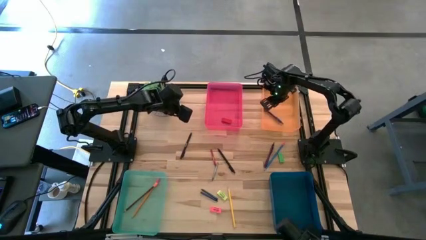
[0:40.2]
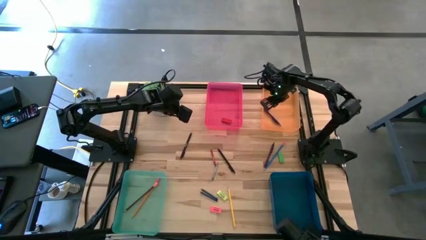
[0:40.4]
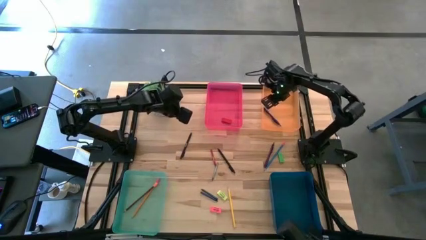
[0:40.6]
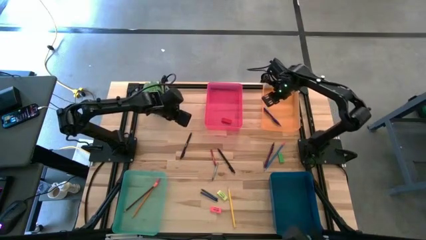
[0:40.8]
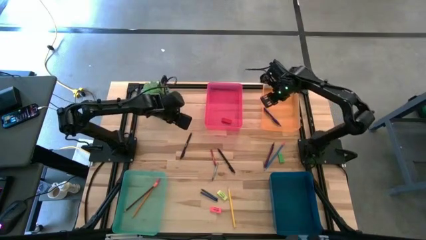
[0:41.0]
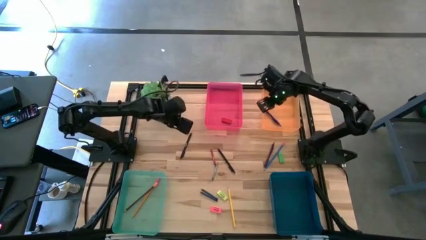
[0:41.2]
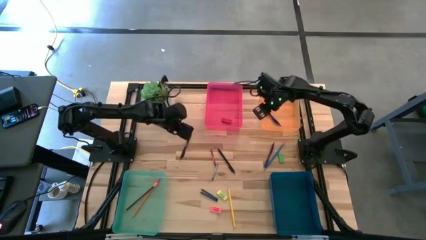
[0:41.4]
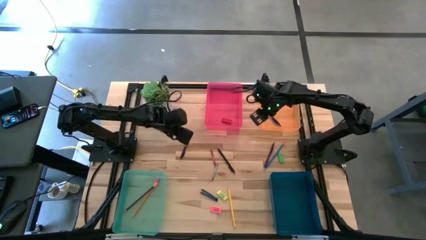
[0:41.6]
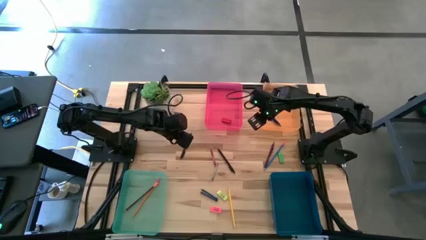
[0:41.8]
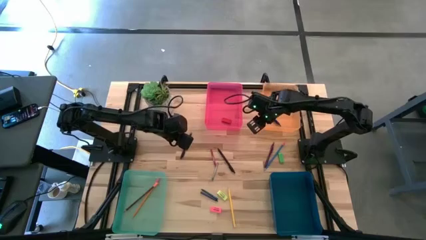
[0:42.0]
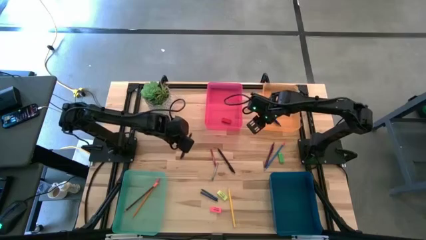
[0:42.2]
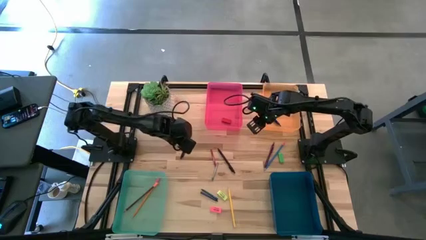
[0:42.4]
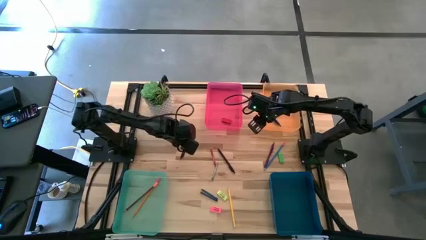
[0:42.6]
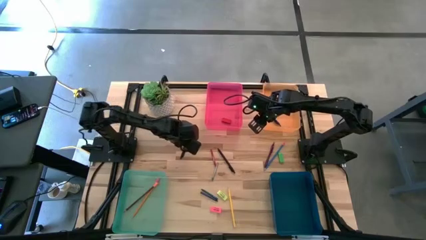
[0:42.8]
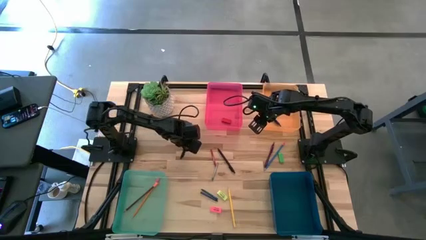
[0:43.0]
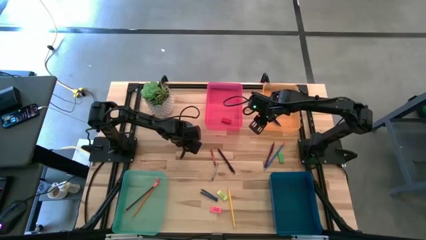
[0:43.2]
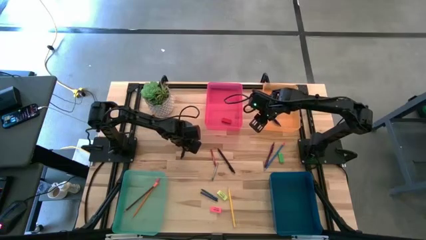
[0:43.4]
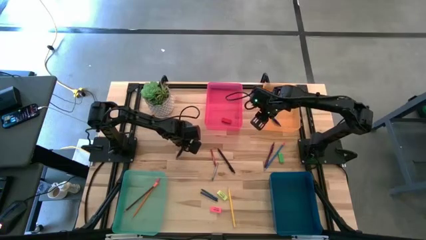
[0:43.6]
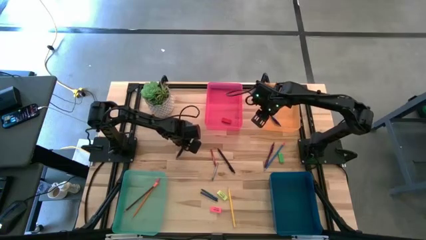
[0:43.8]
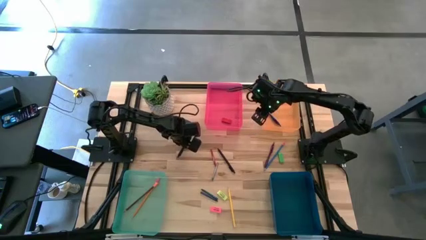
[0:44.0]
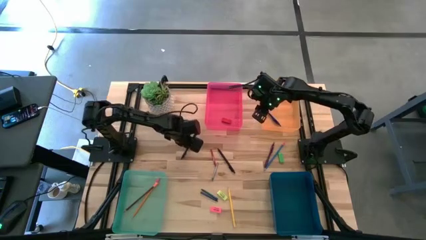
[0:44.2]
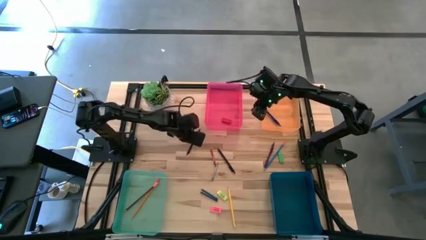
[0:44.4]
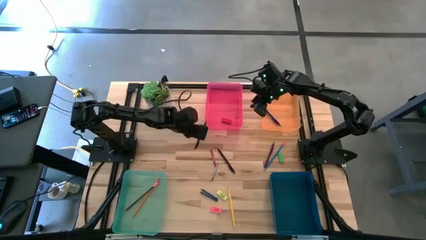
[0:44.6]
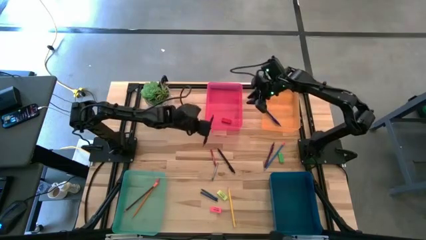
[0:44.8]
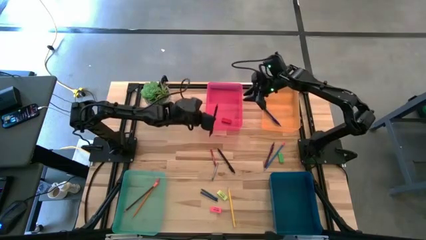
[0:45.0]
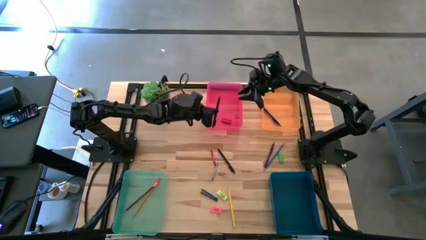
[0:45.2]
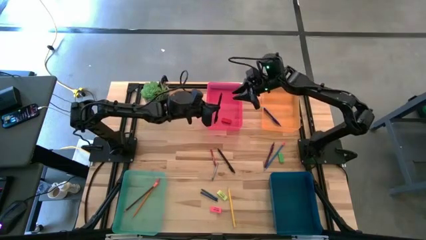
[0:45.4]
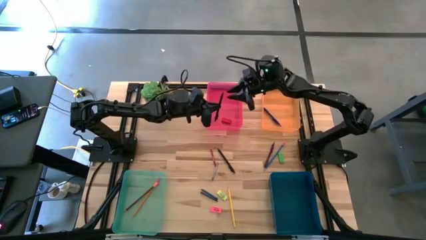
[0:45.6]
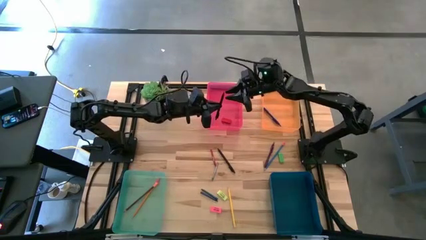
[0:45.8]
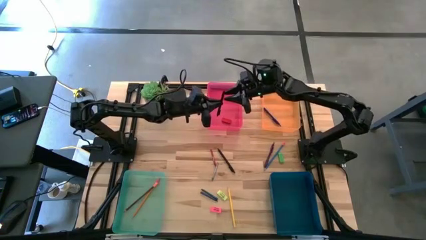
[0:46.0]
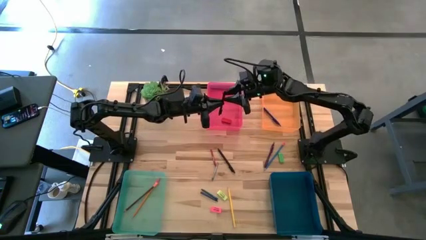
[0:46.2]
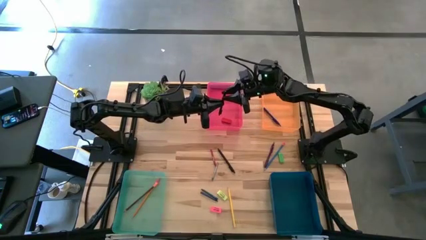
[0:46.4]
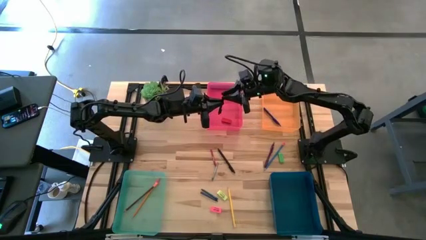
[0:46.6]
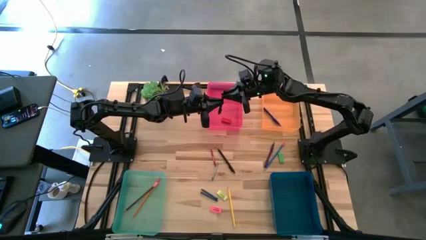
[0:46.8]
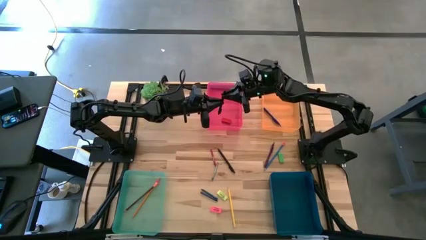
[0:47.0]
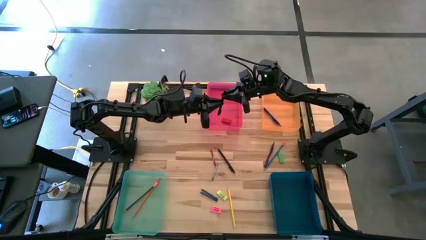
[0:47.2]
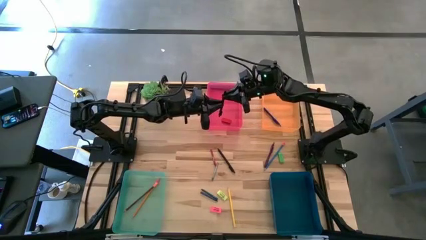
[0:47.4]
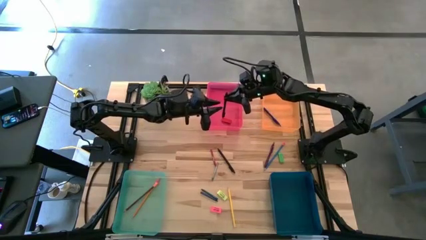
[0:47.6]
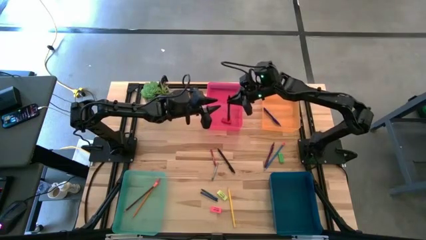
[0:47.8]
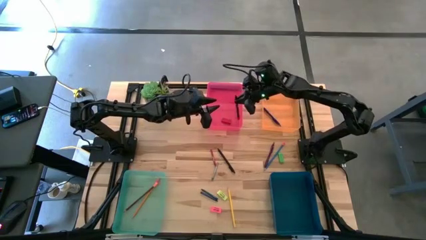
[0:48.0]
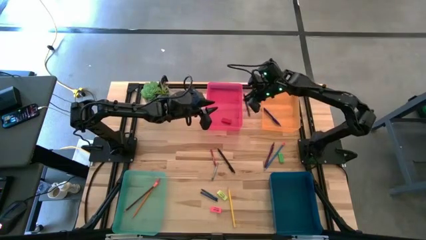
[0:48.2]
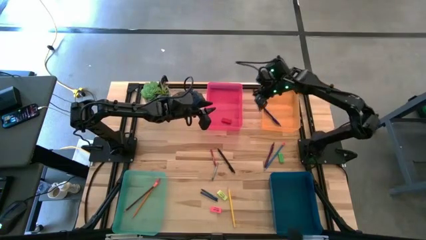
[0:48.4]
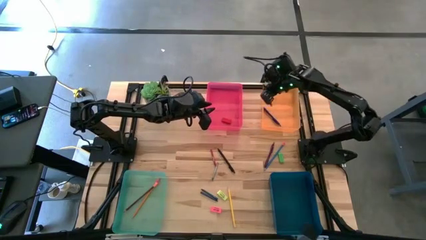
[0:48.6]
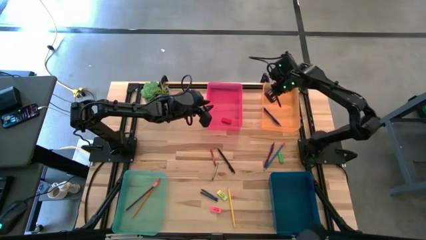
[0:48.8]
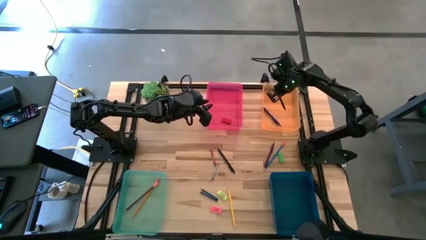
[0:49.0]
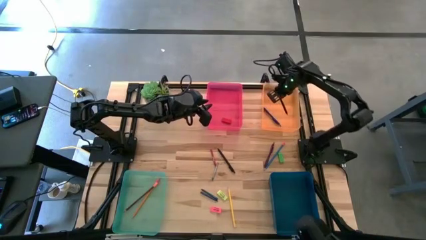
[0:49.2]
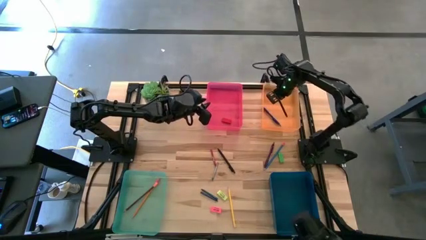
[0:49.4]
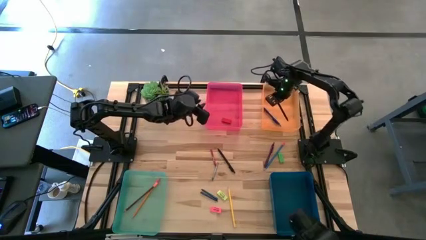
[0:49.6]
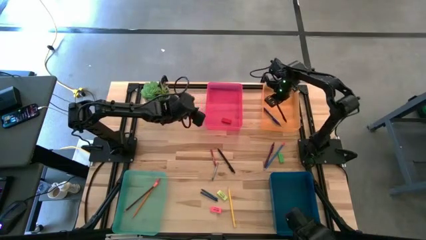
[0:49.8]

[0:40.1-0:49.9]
Task: Sort crayons/erasers/pens/pencils in bins
Put the left black pen into the orange bin

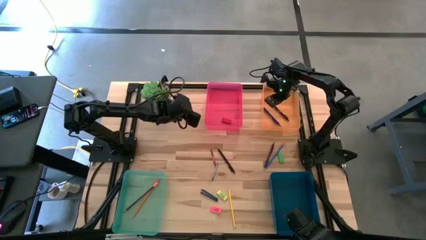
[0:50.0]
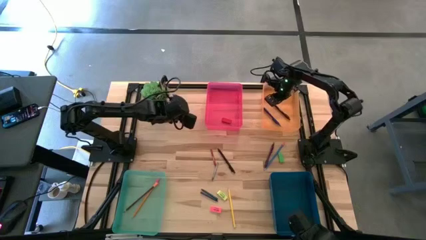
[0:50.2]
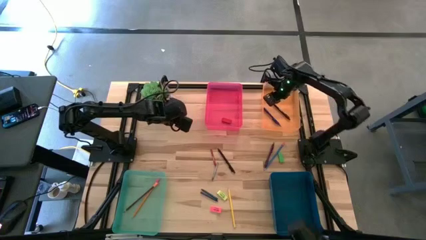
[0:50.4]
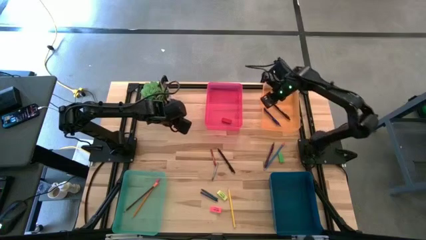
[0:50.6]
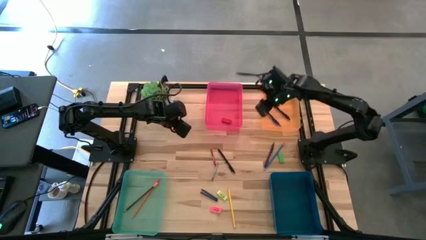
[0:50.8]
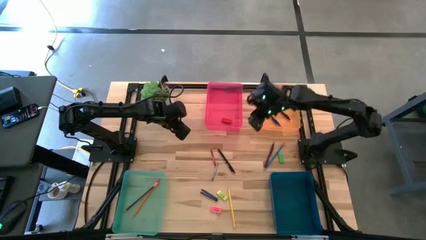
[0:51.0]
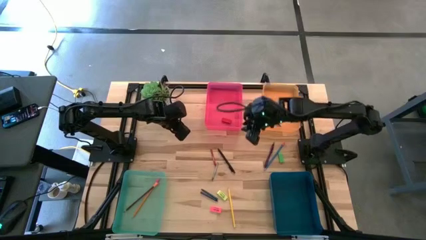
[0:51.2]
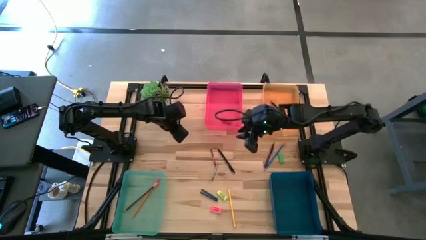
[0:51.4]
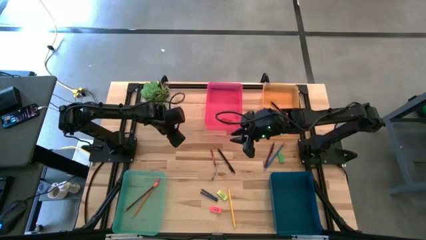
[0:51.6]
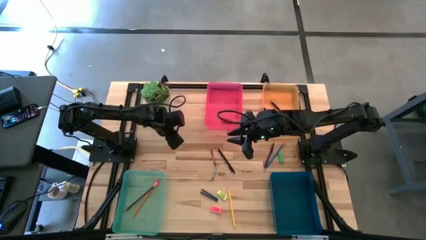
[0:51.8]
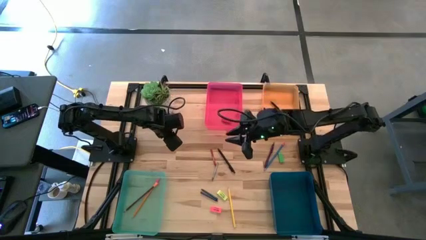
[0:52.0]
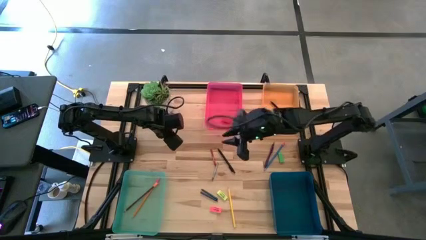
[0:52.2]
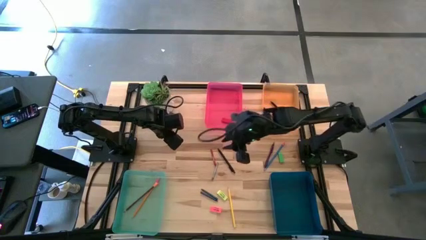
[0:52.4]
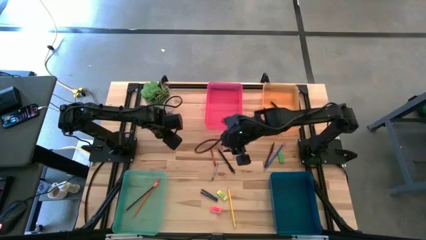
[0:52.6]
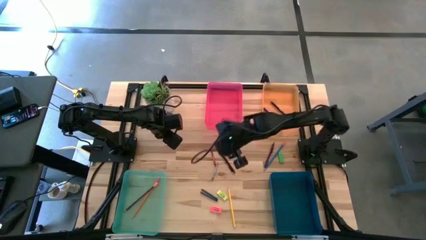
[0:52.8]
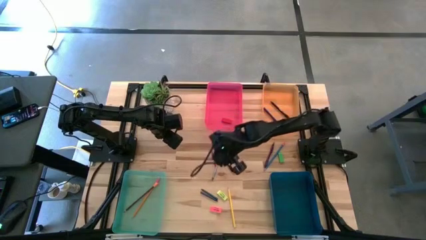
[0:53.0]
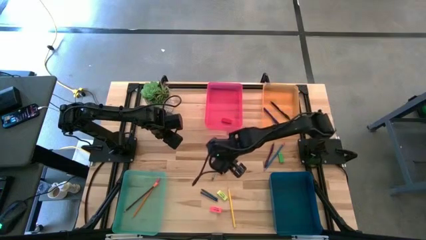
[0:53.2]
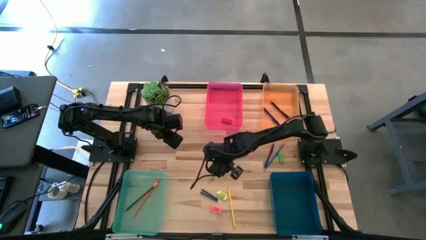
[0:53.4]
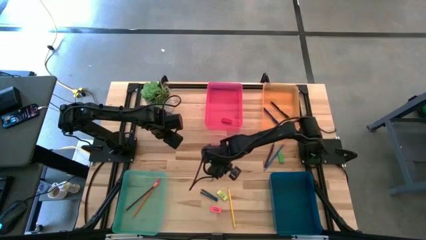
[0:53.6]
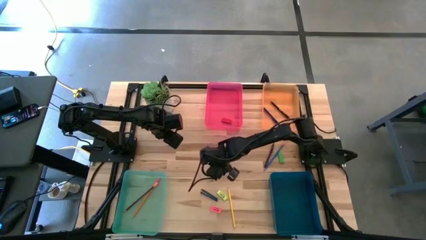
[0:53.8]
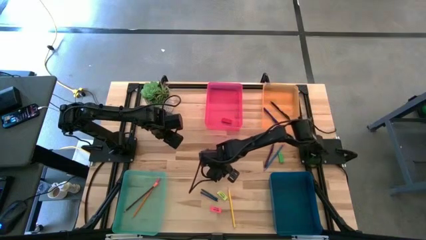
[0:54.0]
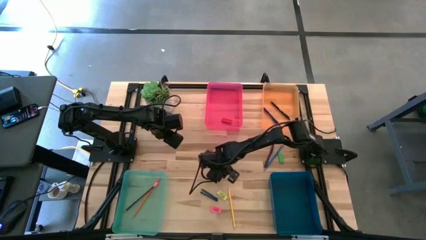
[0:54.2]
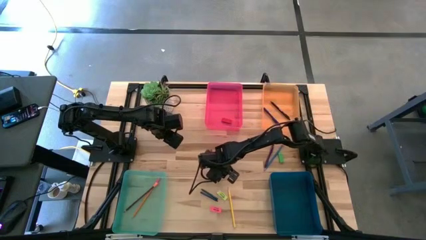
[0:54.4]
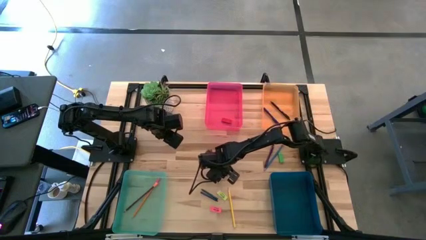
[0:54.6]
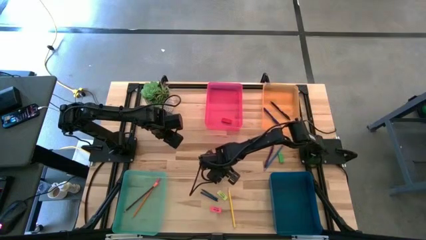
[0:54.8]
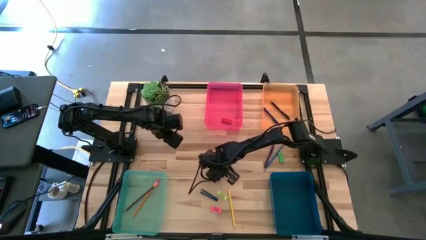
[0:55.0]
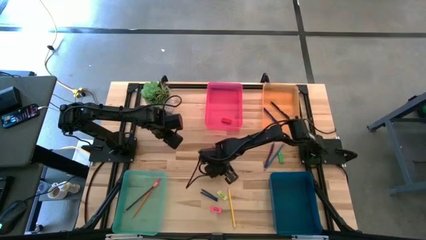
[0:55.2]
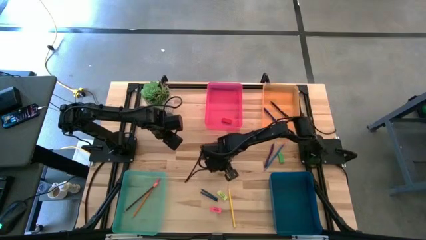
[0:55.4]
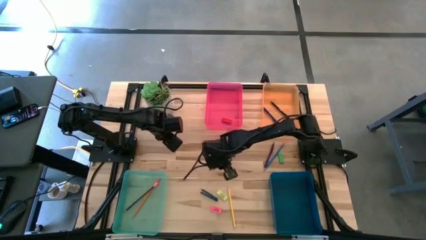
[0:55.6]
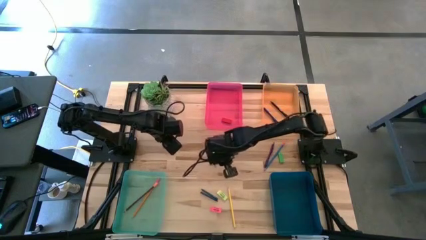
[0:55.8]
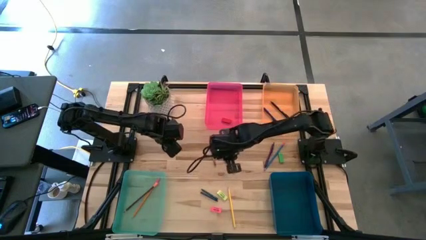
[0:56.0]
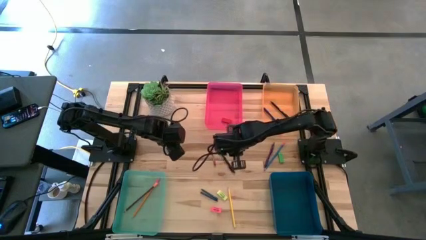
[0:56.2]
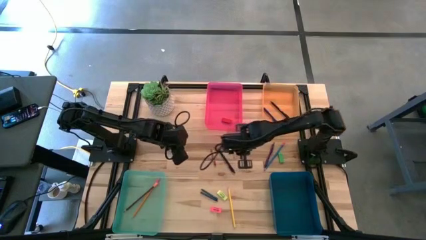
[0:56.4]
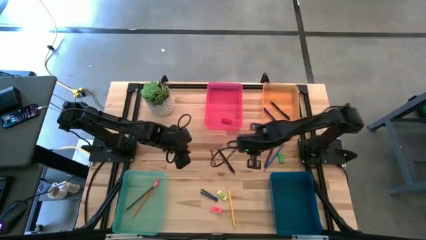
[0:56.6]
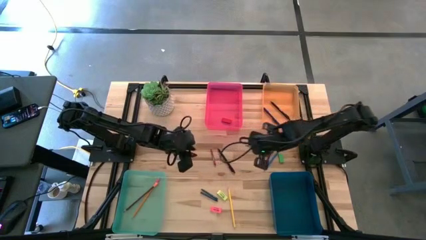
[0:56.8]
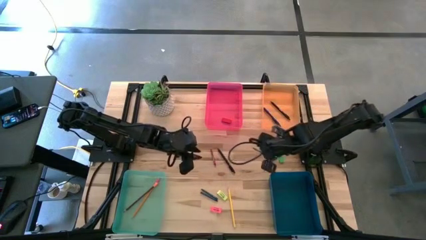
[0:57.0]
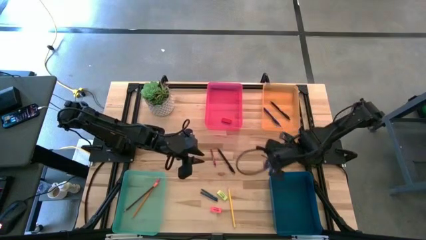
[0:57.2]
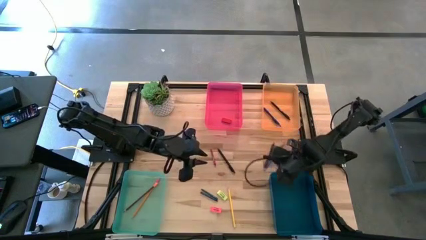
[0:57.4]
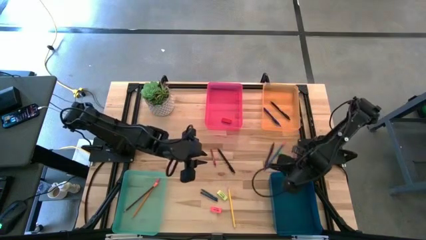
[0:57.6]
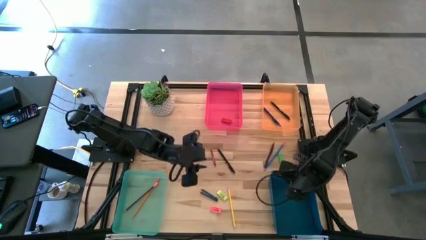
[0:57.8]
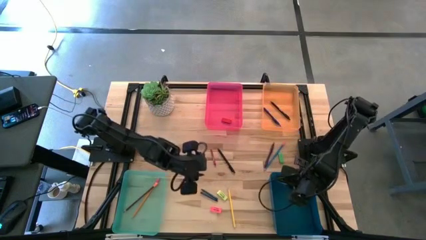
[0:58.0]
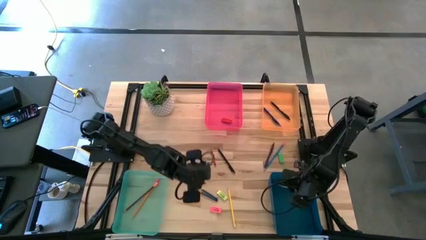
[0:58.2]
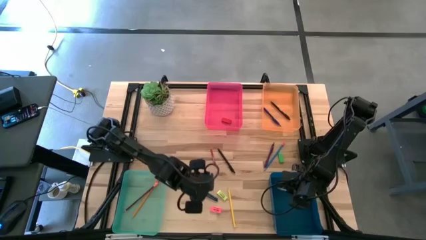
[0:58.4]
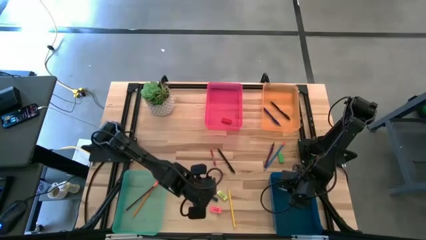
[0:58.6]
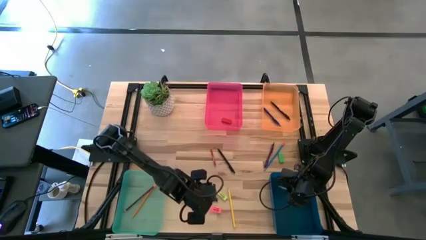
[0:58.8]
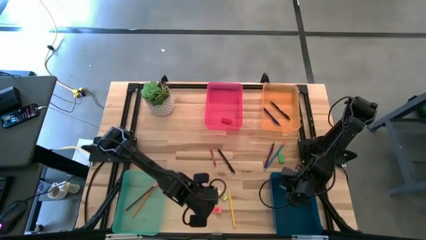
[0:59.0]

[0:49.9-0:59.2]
Put the gray crayon into the blue bin
